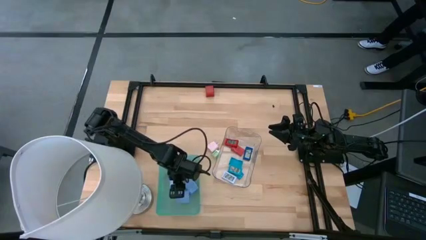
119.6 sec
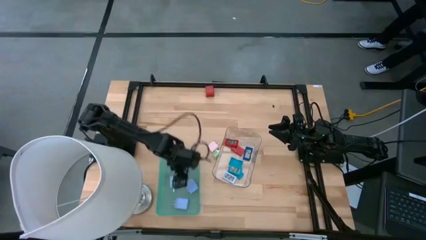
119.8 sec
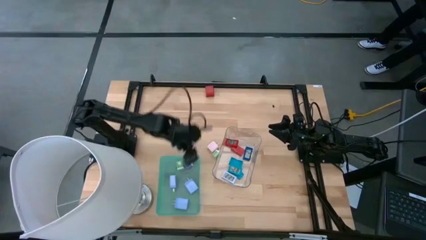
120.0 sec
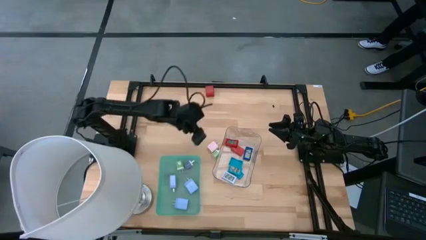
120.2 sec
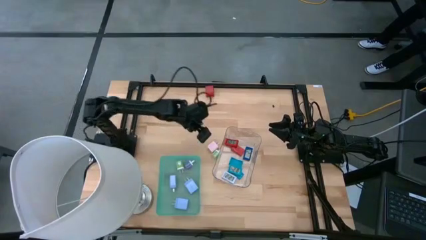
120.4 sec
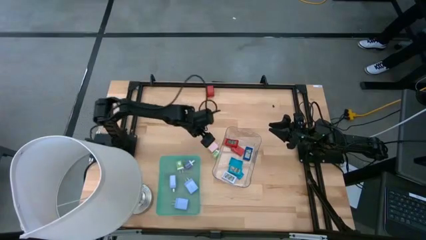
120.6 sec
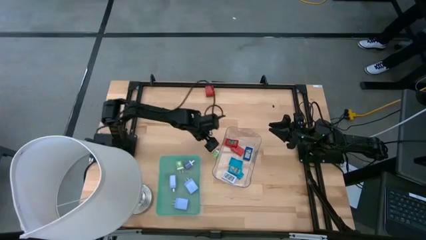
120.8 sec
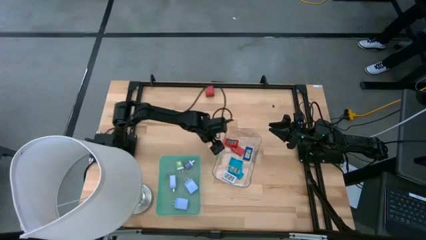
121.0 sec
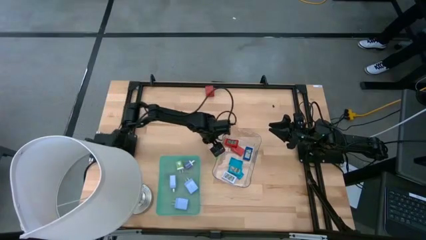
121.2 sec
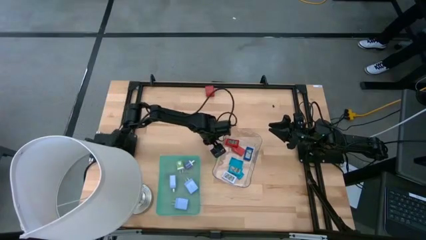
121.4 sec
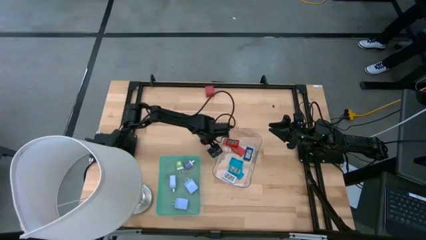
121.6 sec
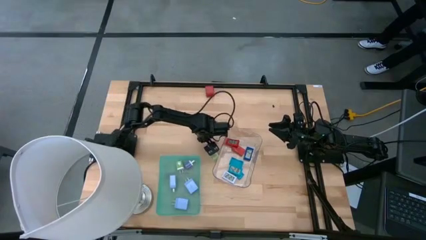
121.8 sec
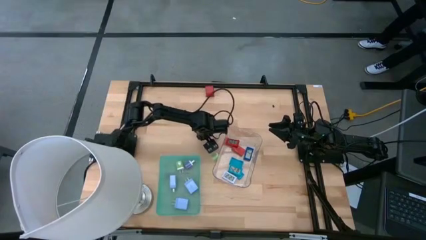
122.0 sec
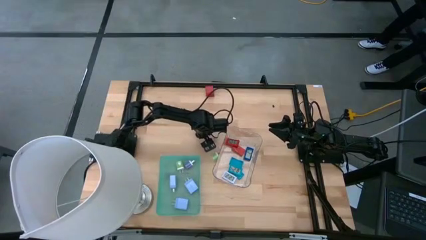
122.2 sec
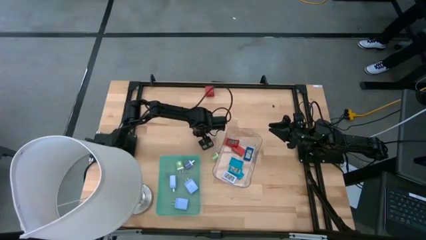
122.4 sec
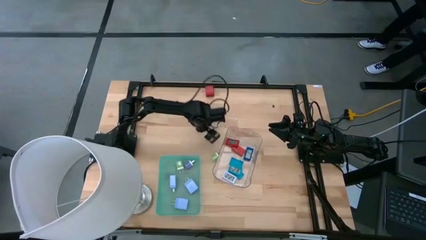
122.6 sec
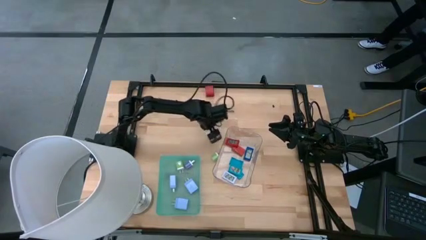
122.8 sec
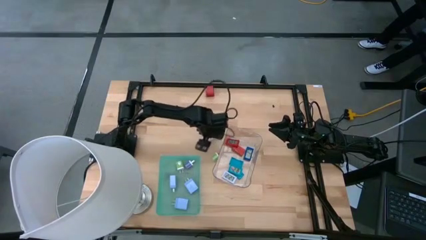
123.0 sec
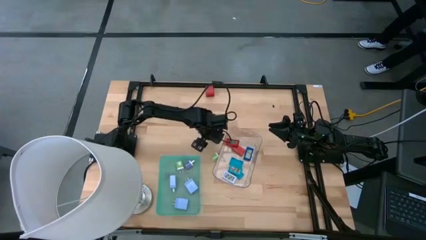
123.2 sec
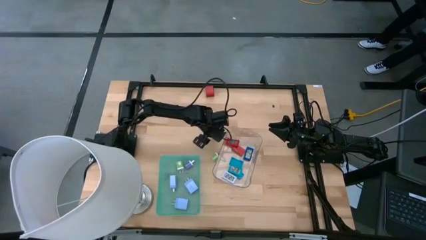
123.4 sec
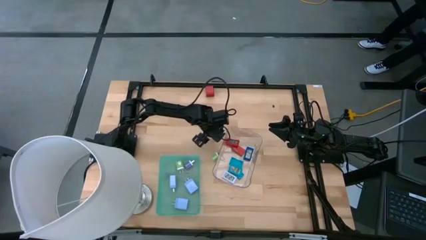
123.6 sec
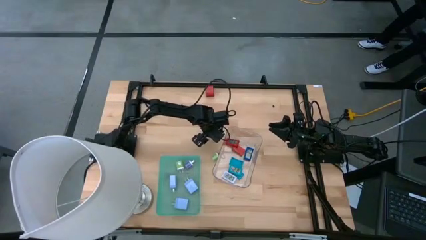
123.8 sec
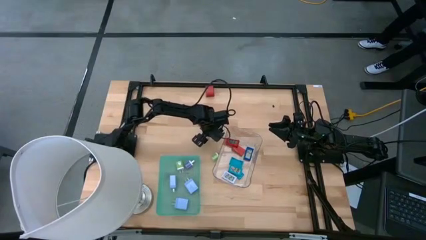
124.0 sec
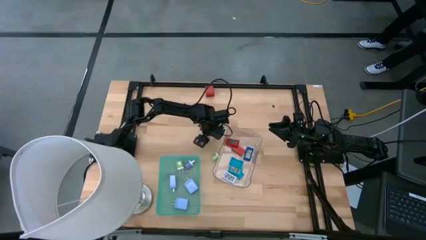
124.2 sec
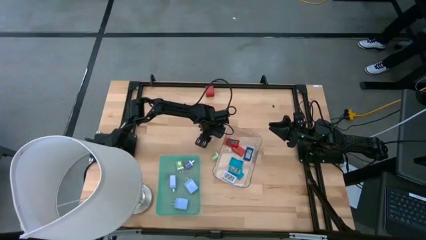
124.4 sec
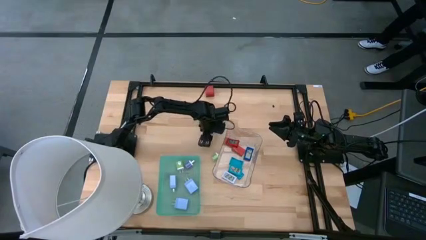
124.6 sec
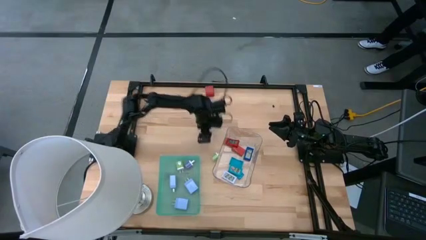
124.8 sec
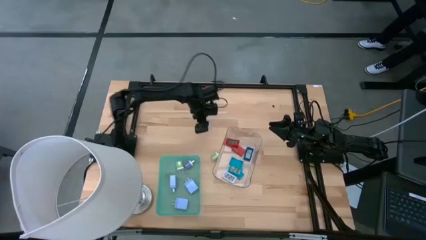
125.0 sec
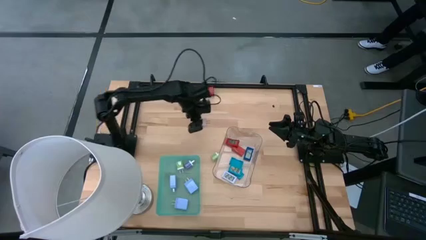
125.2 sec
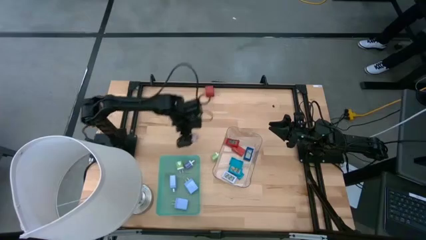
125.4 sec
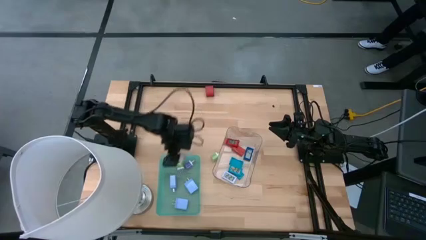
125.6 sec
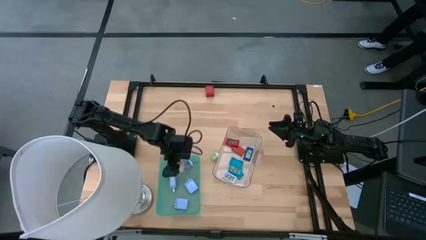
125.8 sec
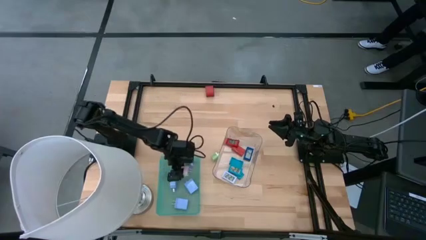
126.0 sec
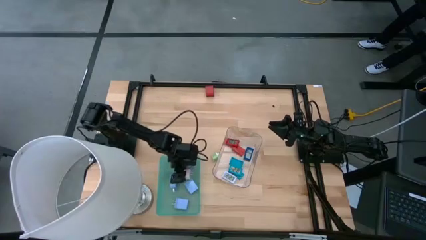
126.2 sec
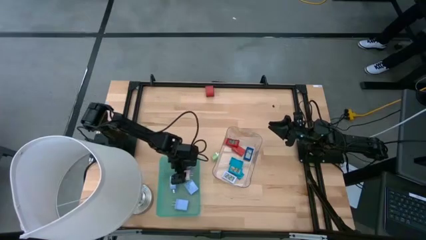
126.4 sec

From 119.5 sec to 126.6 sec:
Task: Pick & Place Office items
Put the pink charger adapter into the green bin

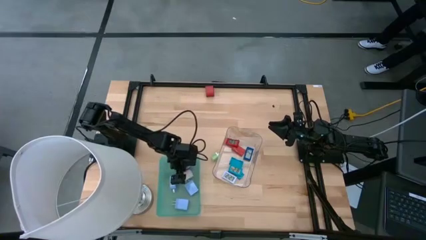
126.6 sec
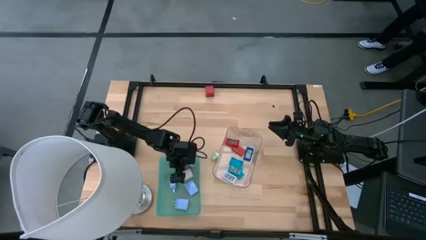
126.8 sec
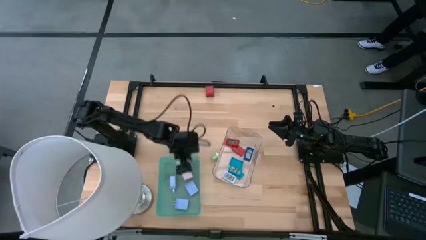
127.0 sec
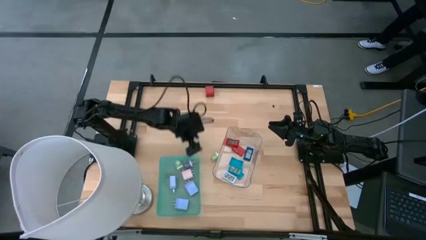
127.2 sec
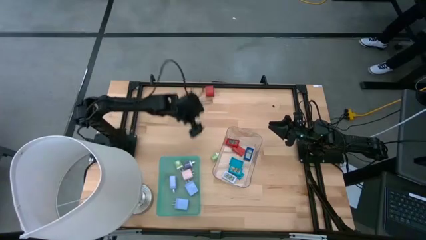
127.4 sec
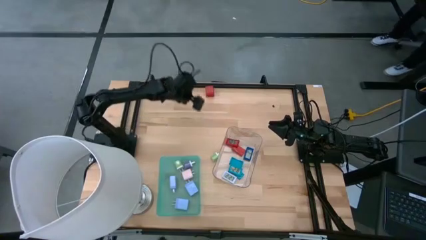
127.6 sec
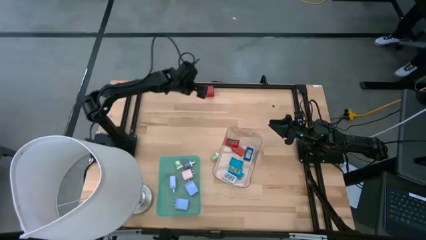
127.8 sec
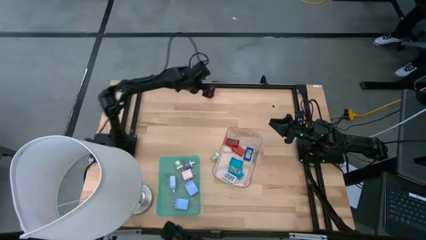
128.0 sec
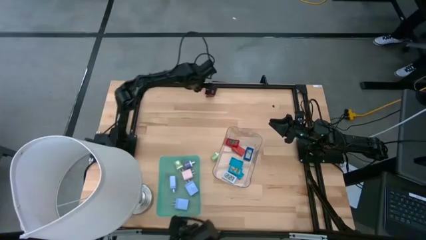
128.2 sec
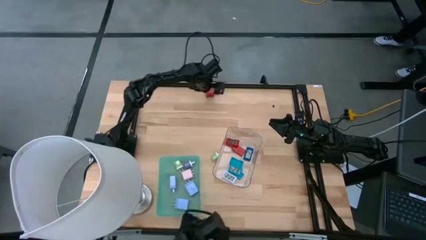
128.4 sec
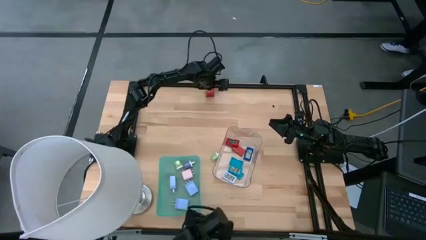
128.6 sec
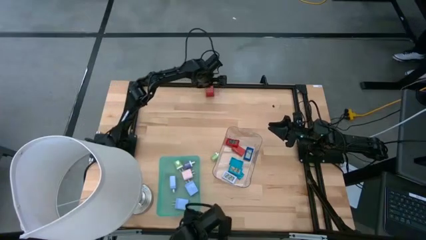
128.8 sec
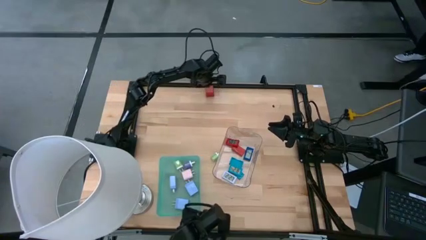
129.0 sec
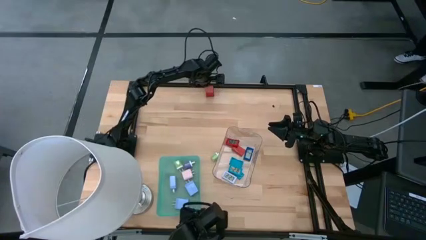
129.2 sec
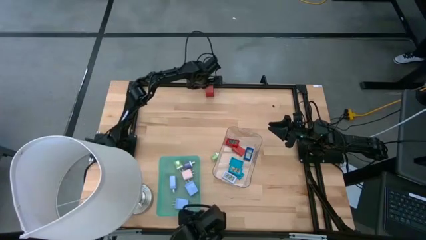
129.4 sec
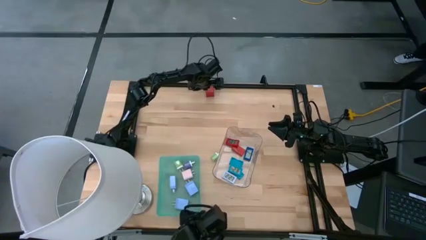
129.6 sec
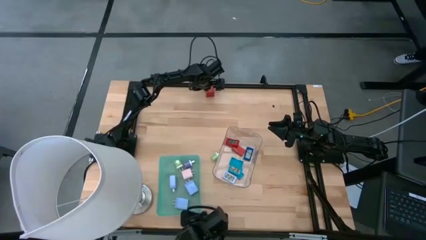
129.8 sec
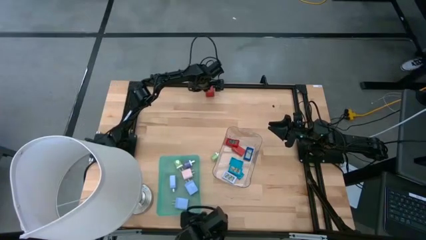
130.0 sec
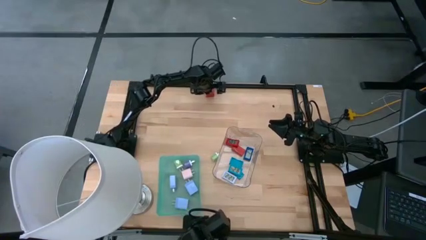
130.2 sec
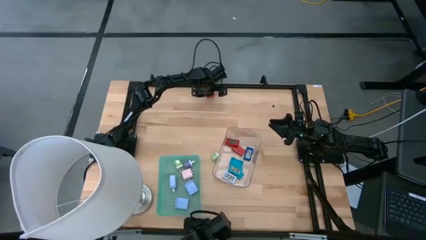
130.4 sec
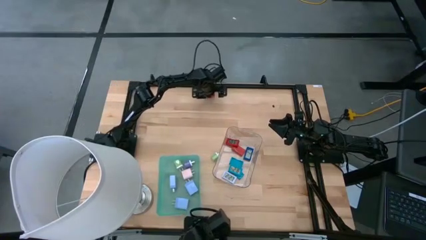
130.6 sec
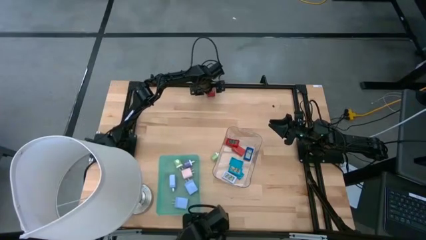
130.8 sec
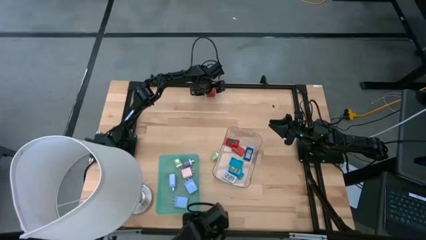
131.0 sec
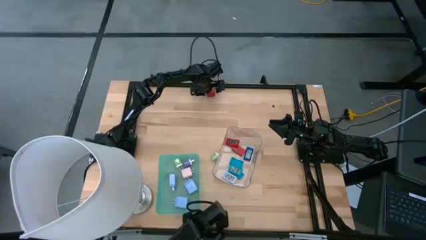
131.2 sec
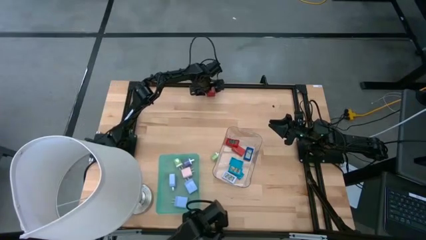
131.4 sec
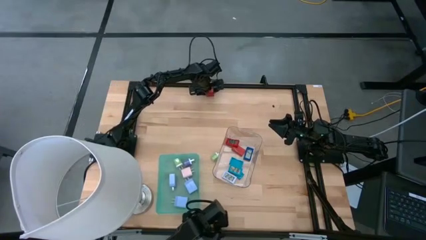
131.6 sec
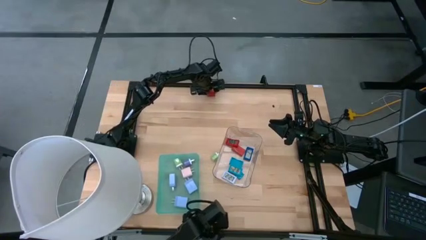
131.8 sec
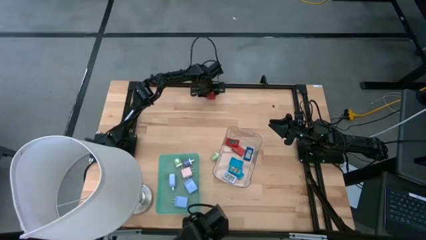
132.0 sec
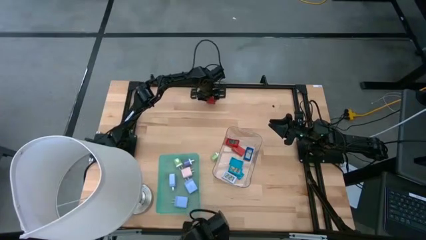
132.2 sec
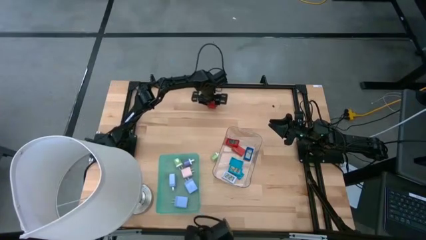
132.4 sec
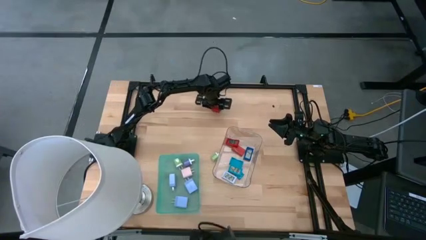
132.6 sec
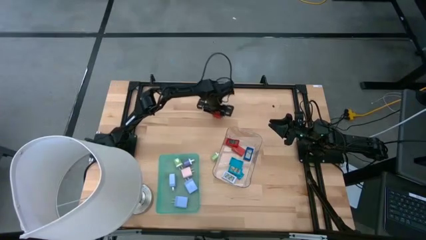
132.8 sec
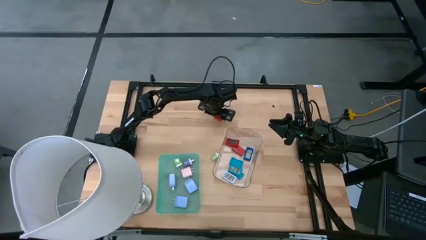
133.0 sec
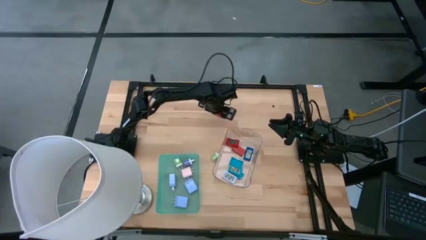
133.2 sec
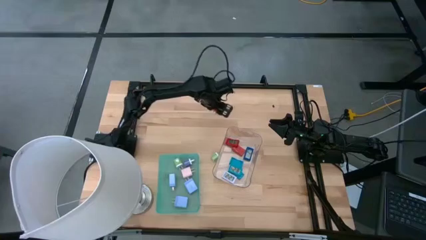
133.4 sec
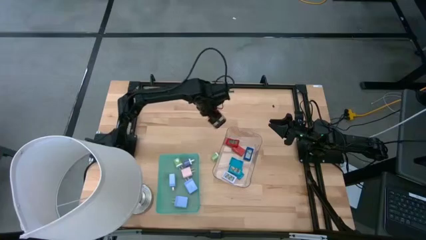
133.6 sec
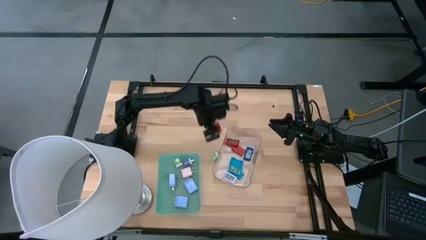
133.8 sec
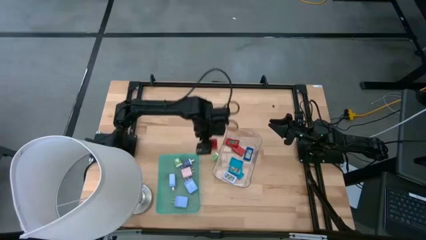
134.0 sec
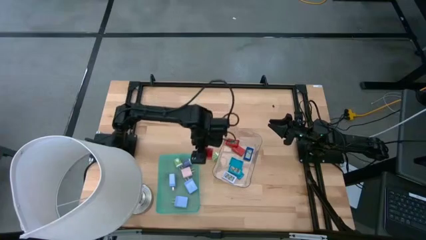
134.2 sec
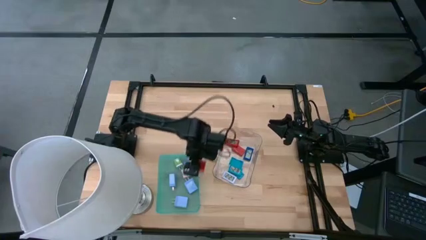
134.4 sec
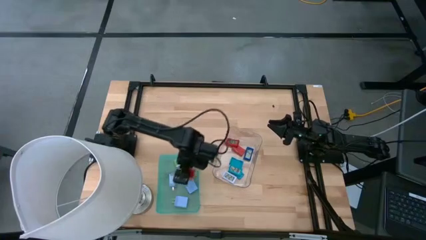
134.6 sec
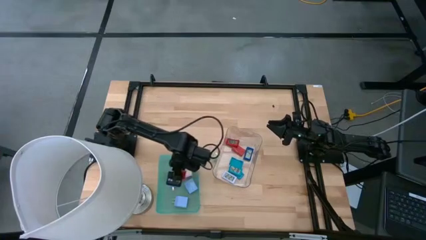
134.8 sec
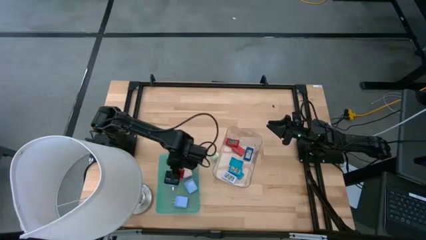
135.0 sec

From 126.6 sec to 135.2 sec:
Put the red charger adapter into the green bin

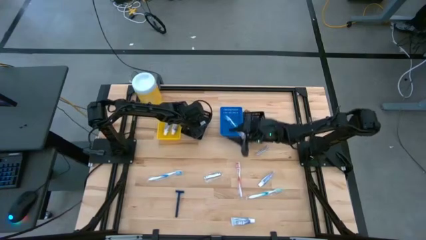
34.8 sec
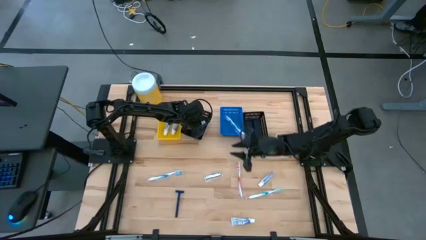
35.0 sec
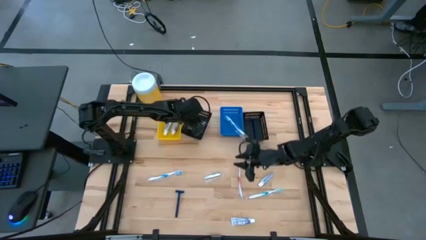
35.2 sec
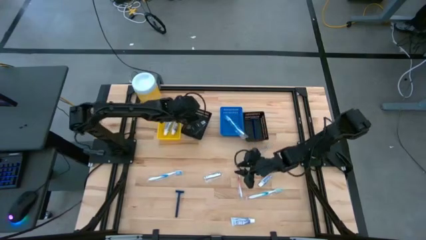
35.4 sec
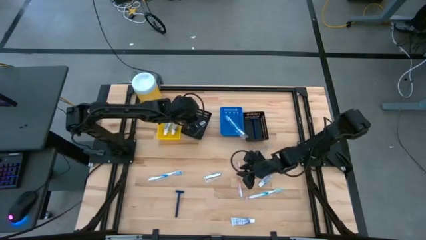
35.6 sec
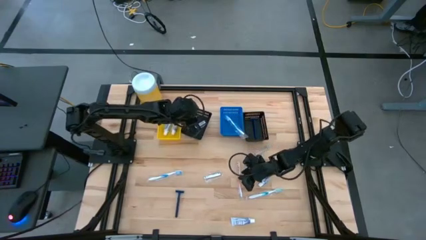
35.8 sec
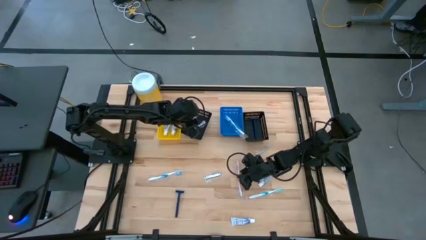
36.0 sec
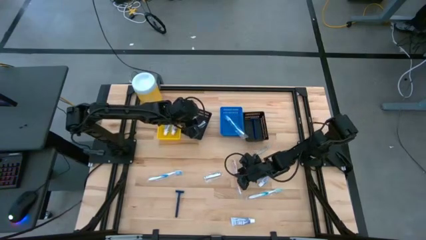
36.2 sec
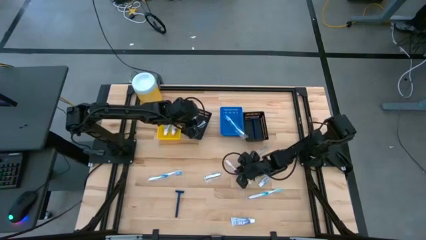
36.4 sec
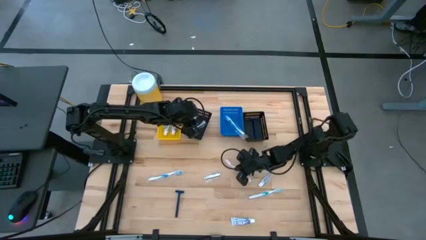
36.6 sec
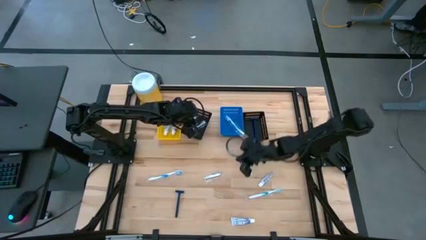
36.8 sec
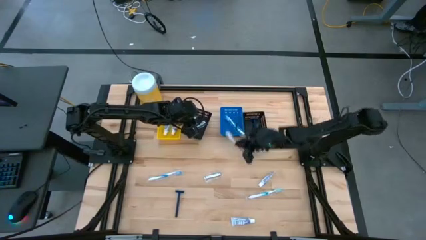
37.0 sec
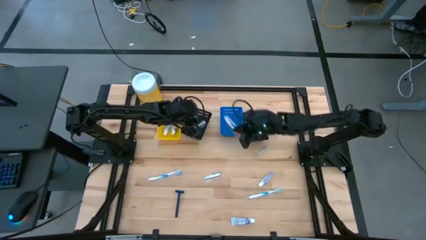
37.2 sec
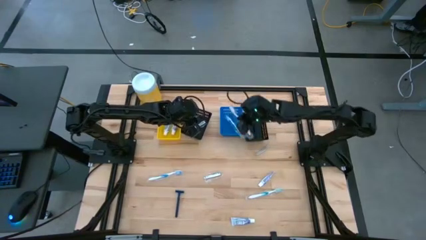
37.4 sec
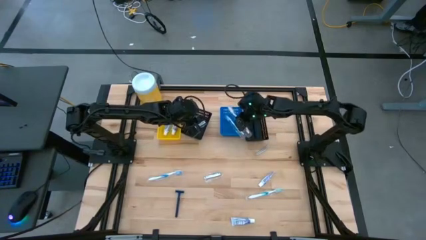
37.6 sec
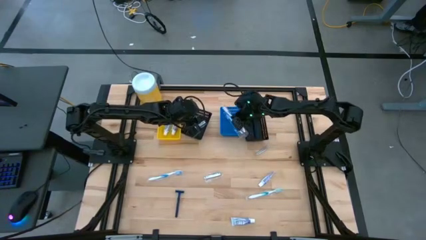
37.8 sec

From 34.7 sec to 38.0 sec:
Task: Pick & Place Travel size toiletries
Put the orange toothbrush into the blue bin
